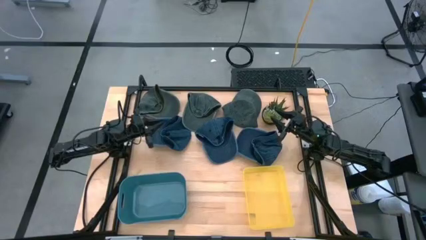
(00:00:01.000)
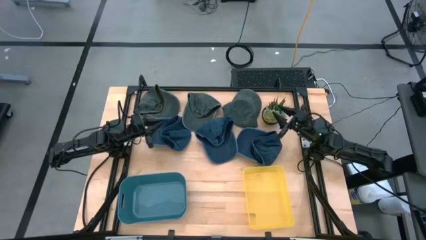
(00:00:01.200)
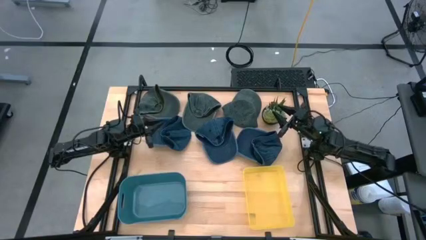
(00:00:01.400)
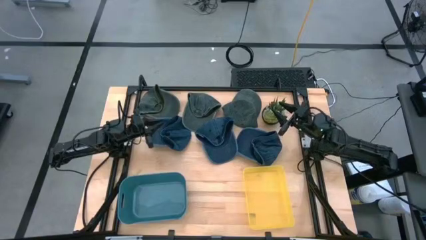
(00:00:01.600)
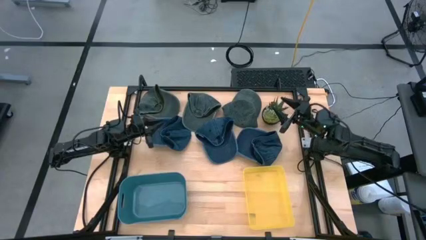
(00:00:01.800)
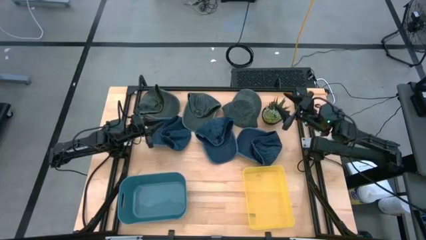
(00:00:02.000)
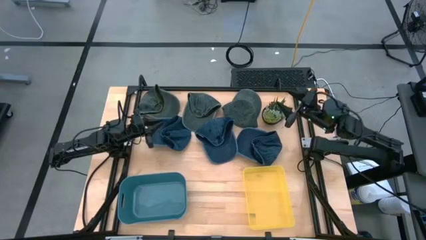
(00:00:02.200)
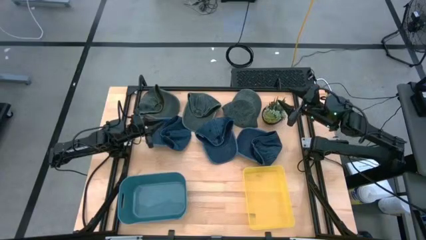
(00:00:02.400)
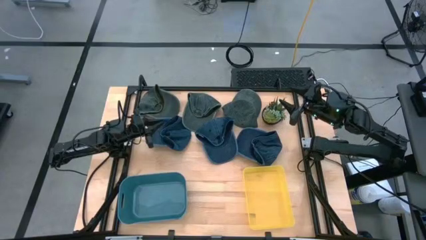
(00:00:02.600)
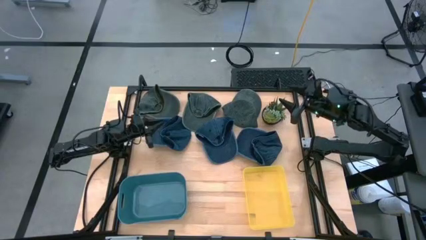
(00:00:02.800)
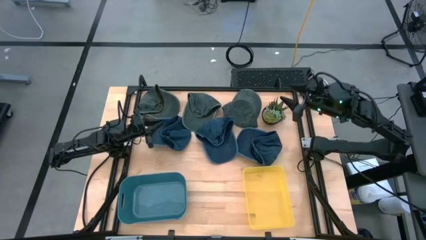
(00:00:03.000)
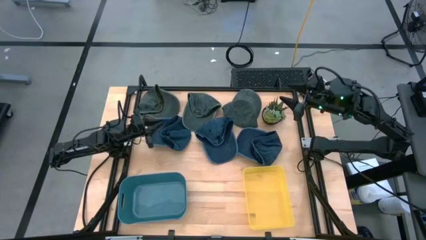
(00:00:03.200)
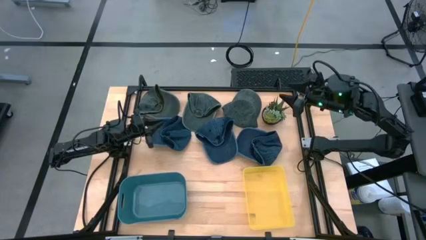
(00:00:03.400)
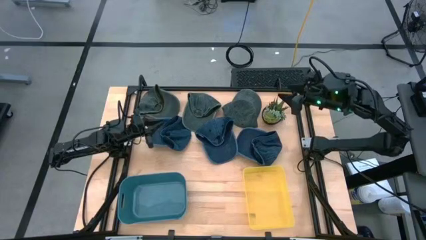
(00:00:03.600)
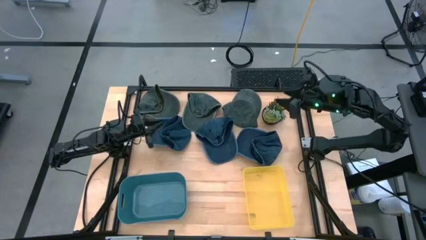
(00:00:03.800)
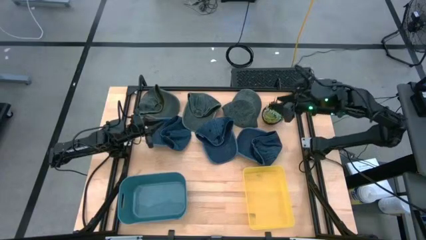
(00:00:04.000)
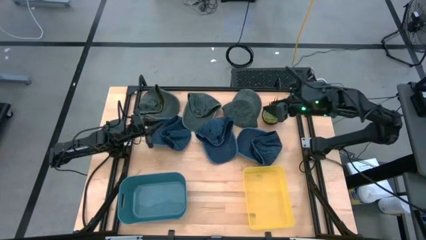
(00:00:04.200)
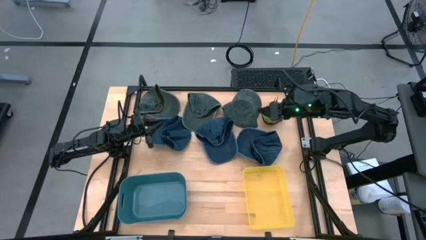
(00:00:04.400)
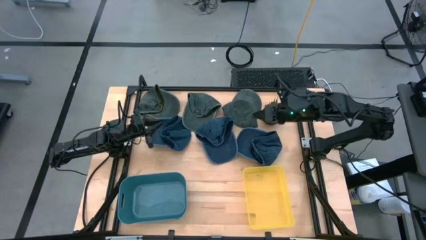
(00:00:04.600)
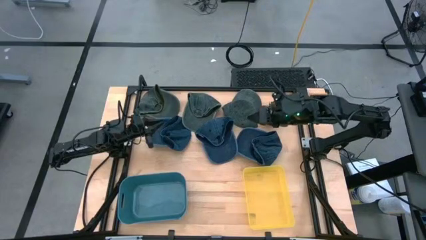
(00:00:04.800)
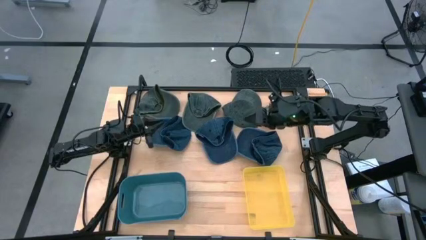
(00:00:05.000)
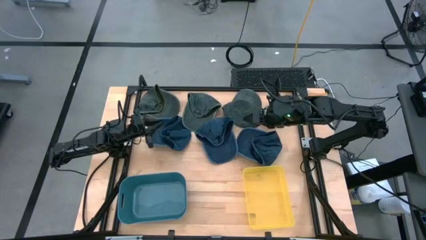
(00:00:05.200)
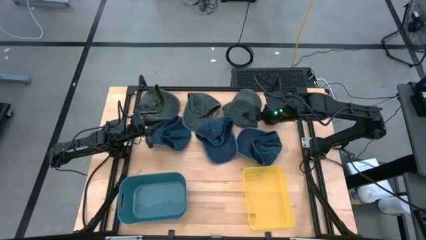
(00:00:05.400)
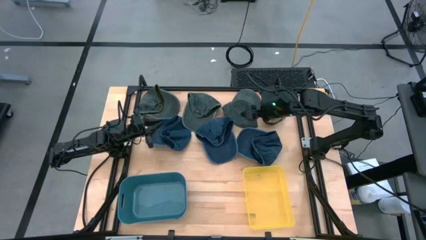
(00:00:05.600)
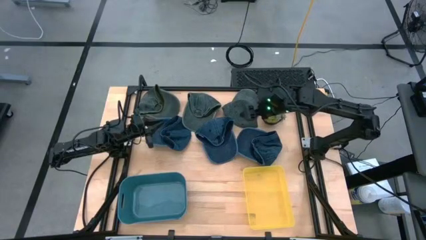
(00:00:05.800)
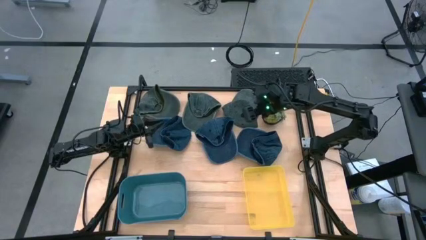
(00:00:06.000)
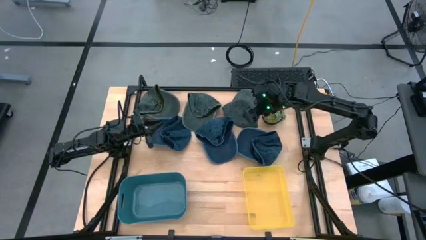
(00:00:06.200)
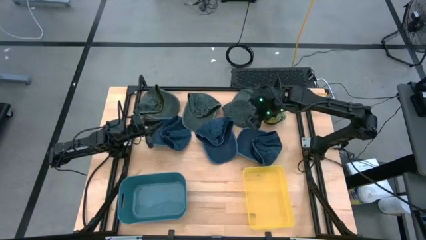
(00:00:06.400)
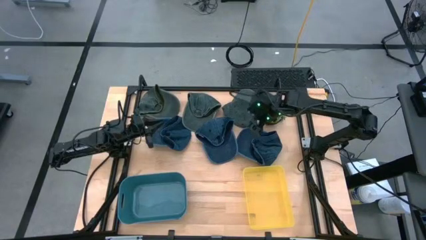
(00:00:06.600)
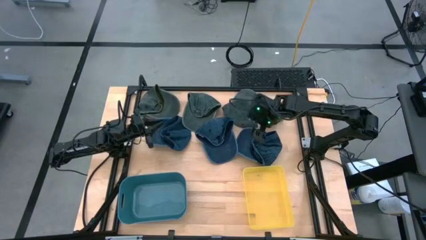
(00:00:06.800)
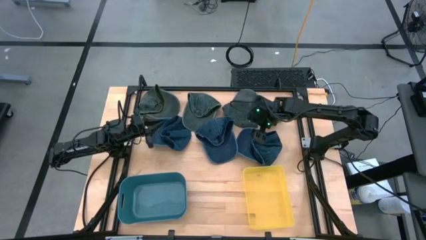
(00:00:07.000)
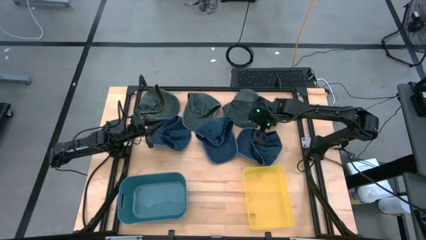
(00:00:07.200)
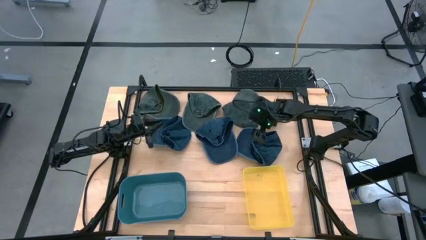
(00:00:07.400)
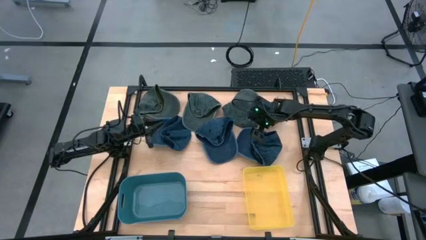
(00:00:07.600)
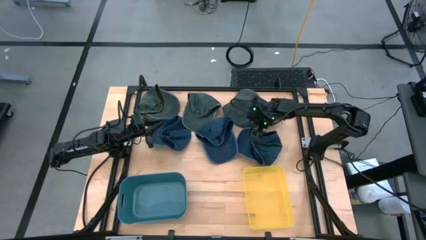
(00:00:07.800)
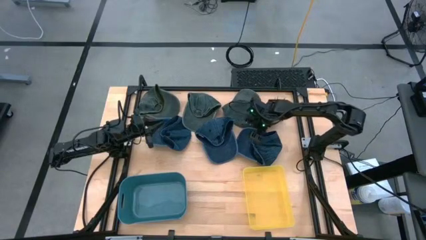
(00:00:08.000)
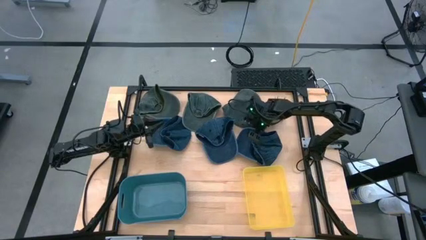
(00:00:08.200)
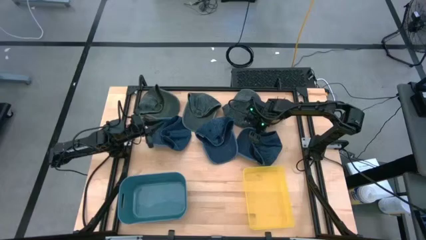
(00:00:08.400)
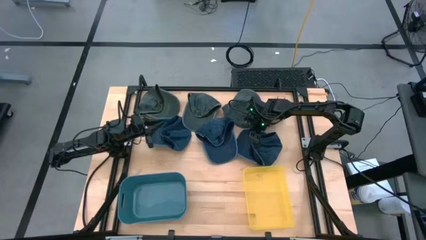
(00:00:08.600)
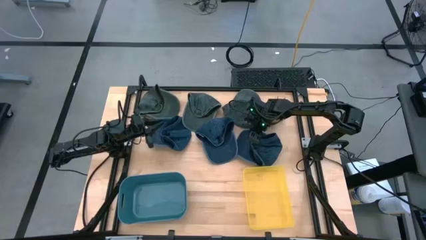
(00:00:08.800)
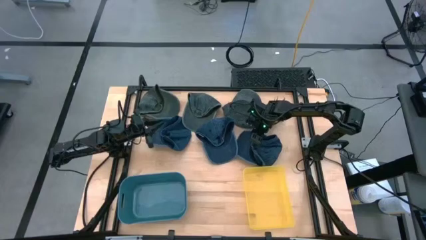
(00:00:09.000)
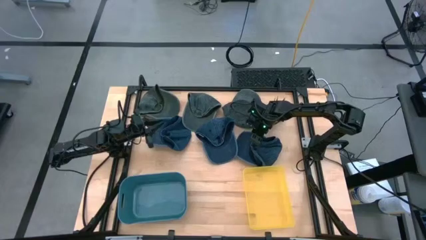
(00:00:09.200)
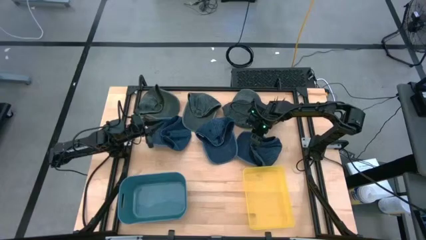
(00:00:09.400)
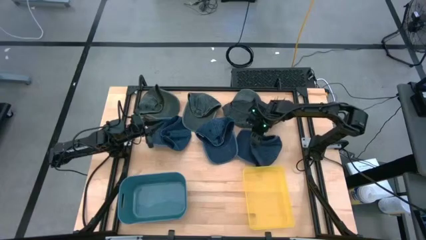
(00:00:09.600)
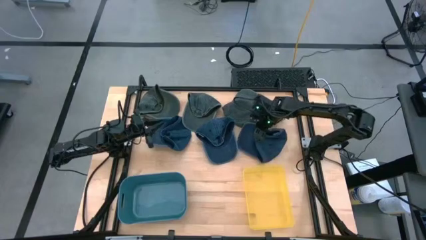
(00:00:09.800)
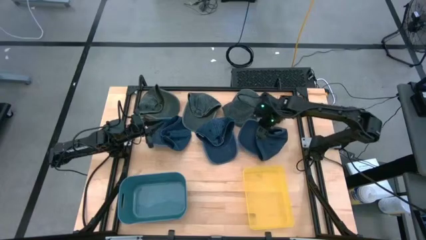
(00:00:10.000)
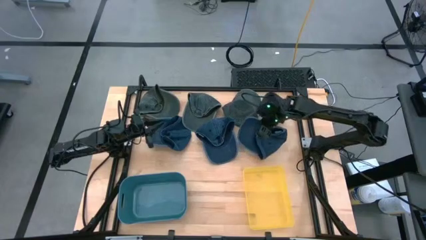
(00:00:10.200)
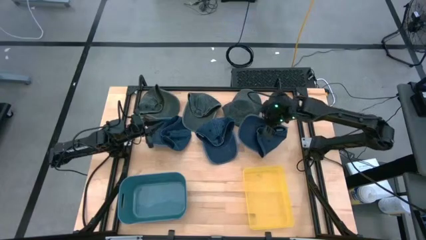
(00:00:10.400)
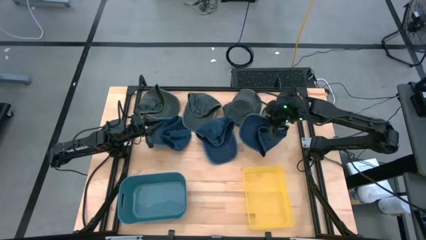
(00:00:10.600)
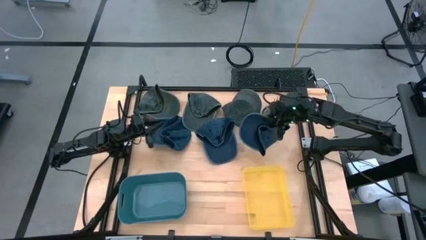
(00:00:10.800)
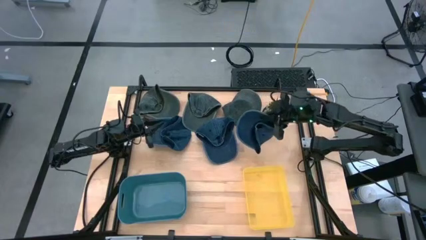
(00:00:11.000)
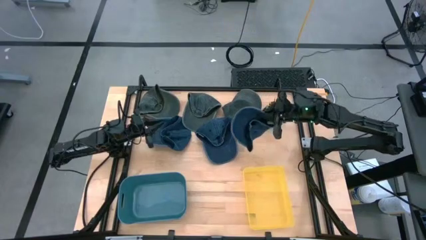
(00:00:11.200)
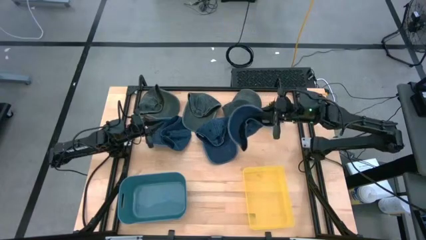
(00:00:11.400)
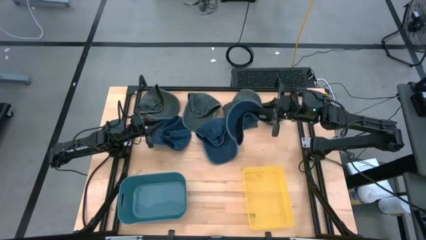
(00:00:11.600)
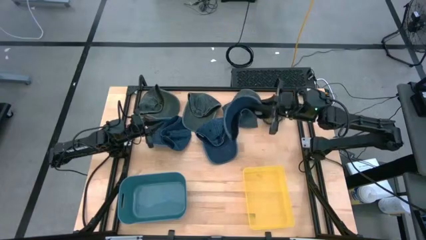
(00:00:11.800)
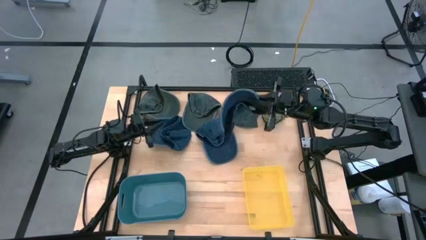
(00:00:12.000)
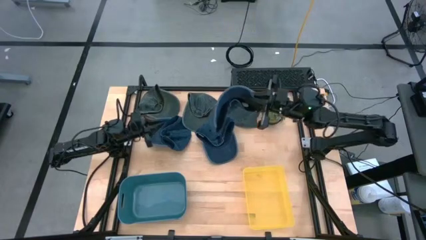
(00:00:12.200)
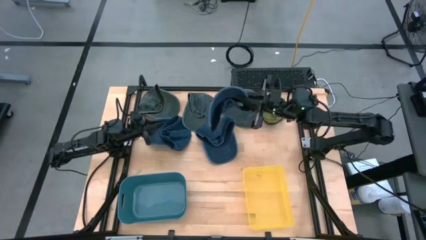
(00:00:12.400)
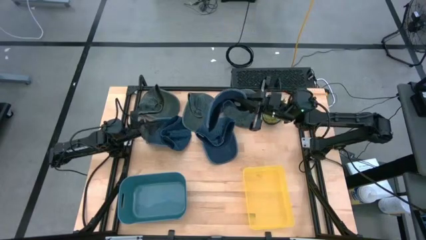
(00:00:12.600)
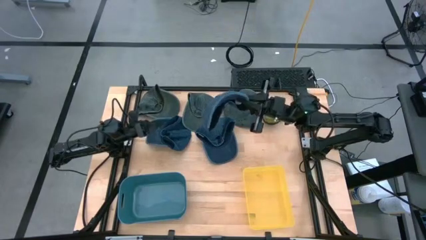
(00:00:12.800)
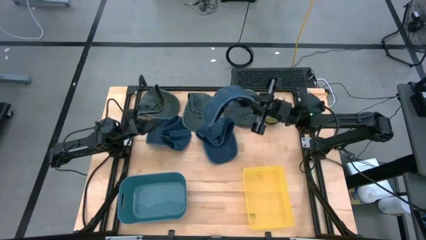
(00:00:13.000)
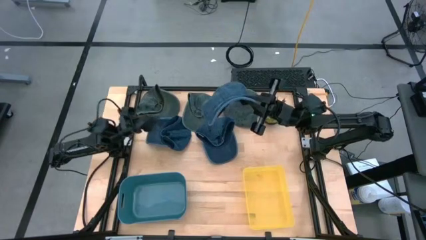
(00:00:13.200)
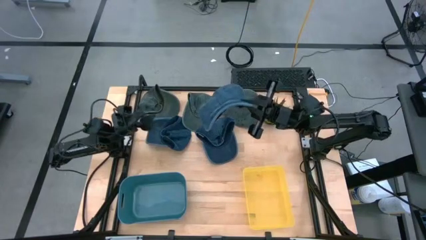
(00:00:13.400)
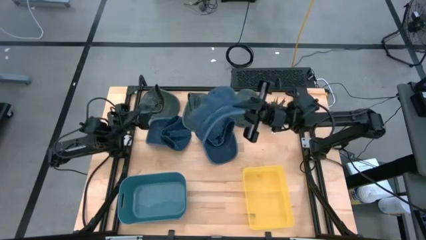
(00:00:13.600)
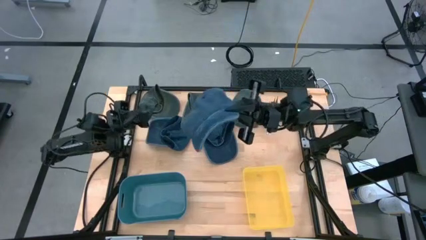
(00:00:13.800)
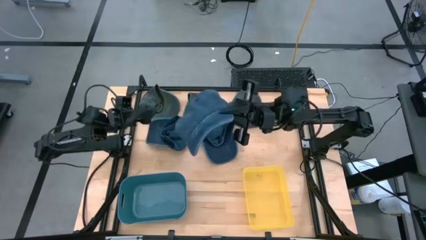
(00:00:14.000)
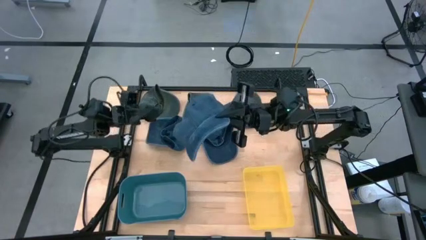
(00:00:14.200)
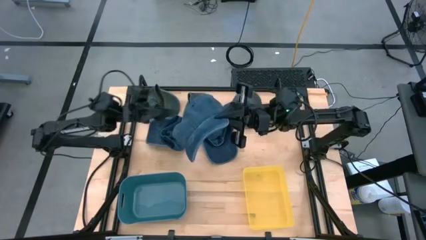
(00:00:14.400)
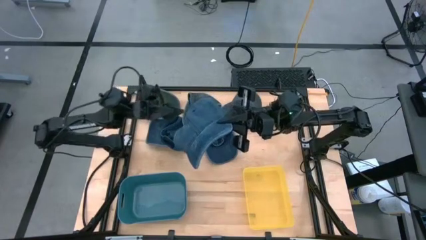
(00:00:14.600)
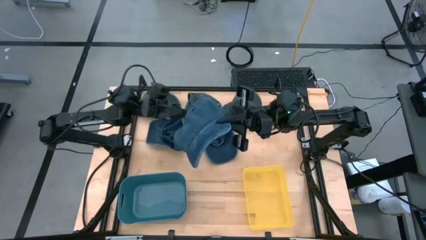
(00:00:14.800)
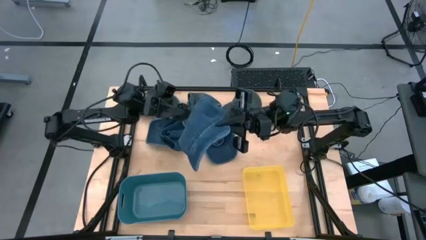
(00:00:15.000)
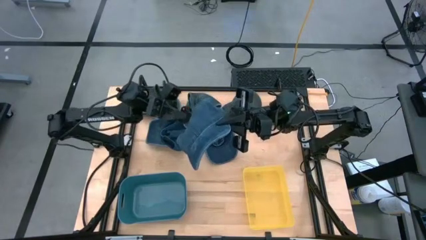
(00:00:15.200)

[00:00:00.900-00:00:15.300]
Task: Pick & Place hat
Put the right dark blue cap into the blue bin
